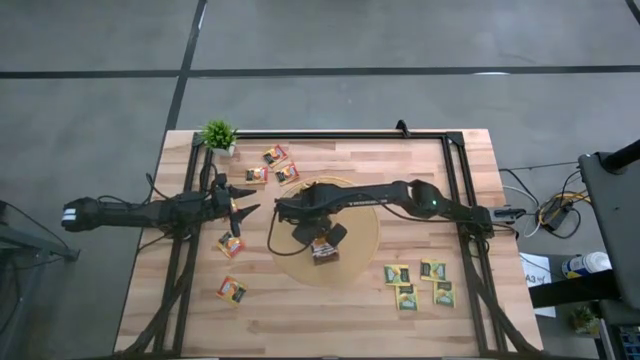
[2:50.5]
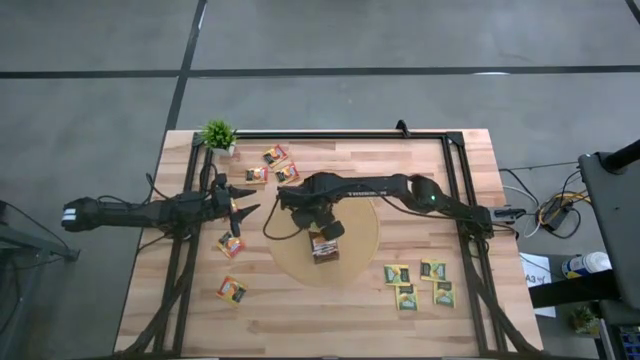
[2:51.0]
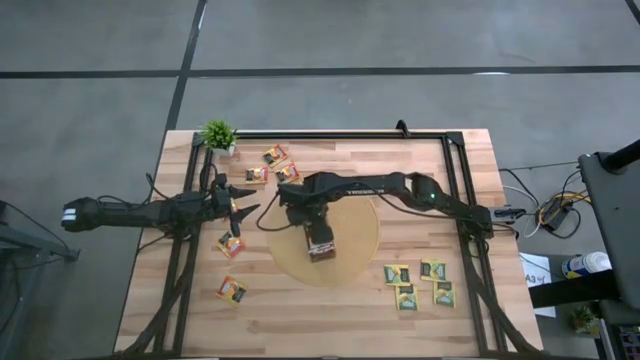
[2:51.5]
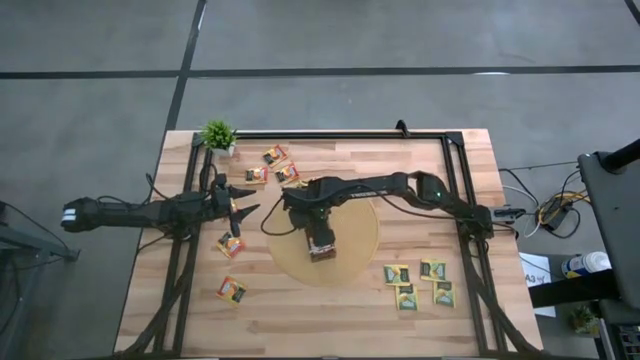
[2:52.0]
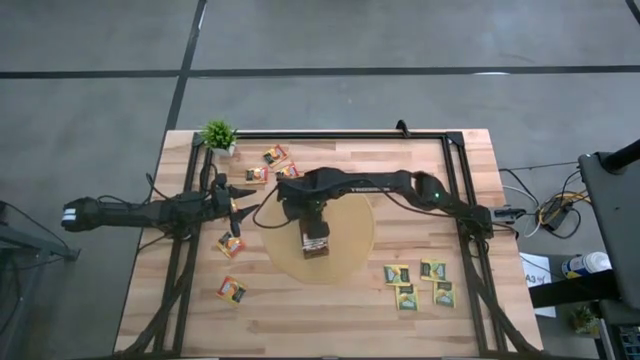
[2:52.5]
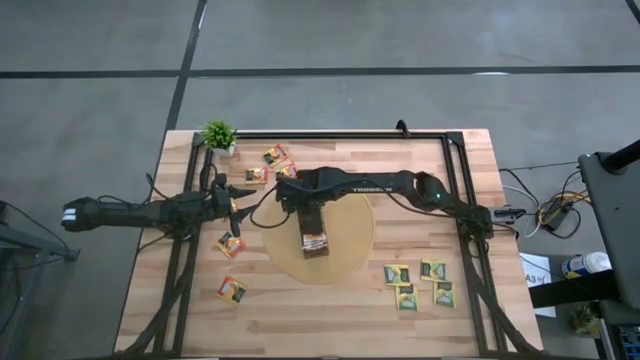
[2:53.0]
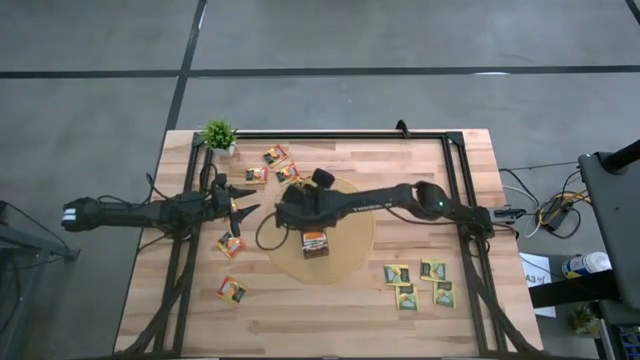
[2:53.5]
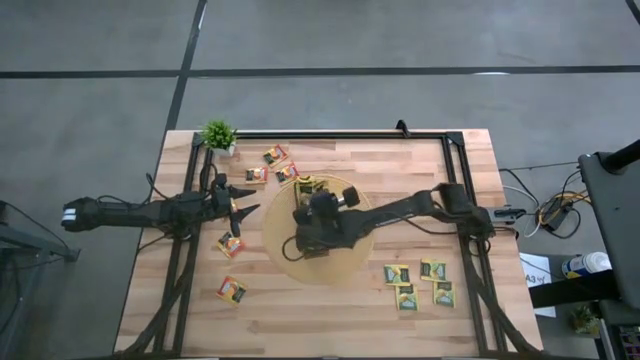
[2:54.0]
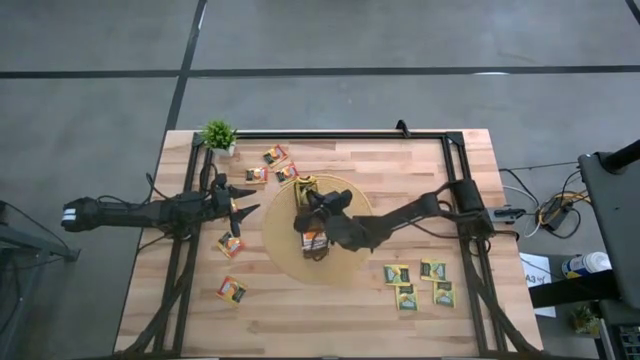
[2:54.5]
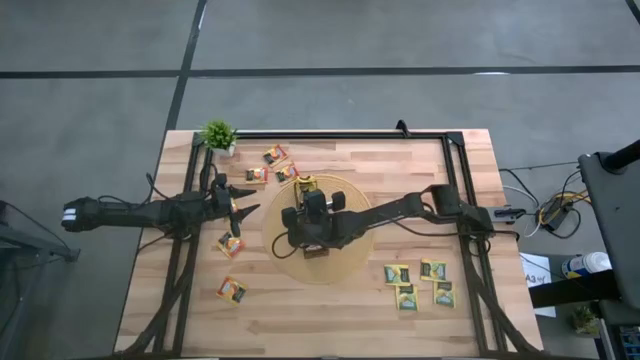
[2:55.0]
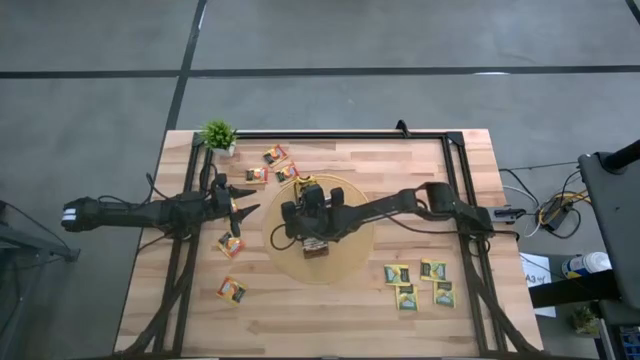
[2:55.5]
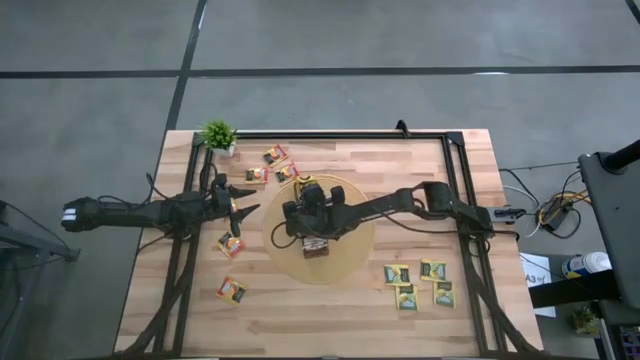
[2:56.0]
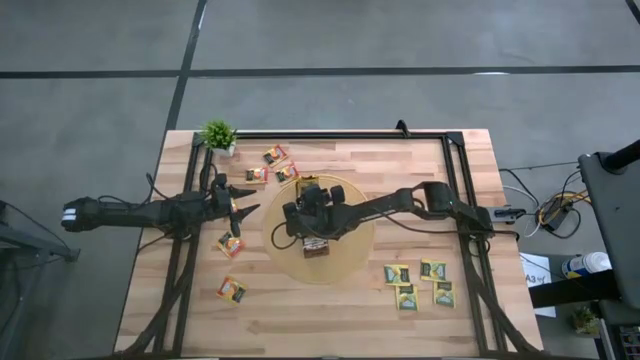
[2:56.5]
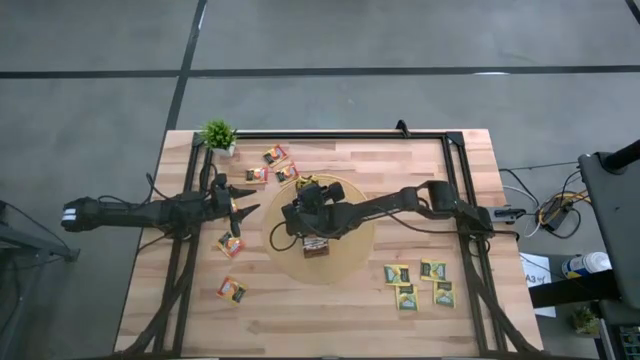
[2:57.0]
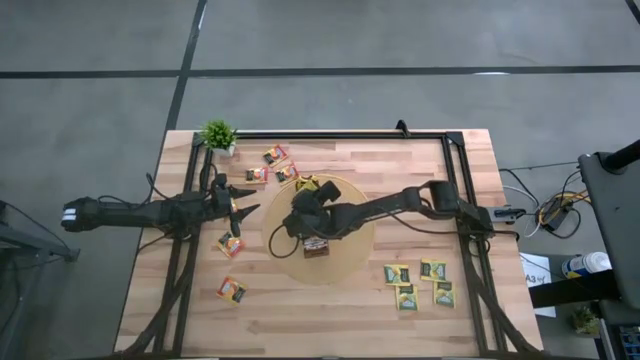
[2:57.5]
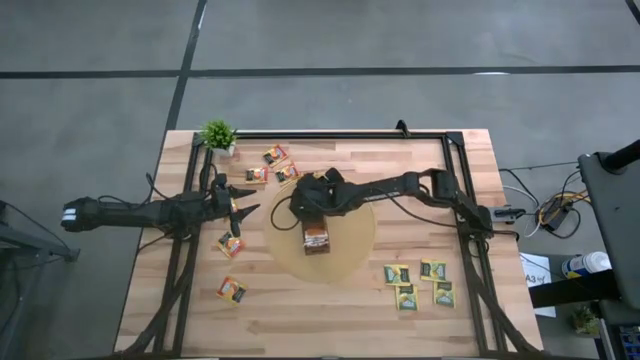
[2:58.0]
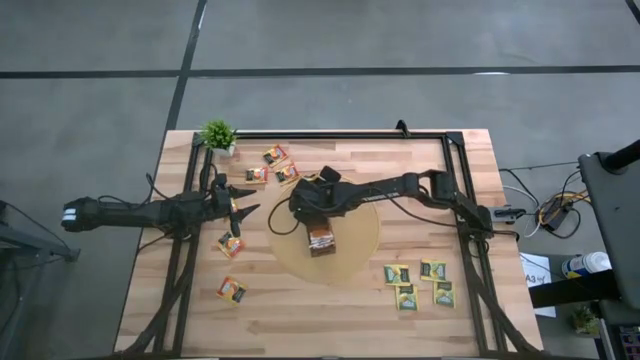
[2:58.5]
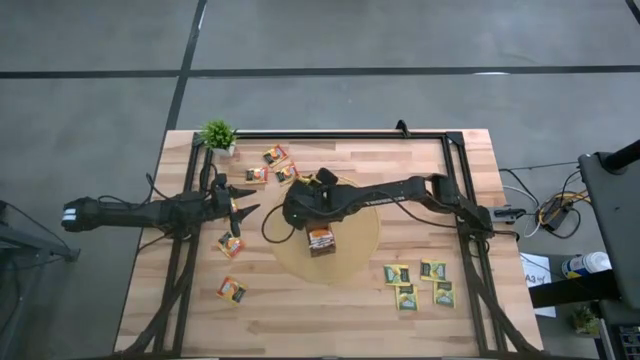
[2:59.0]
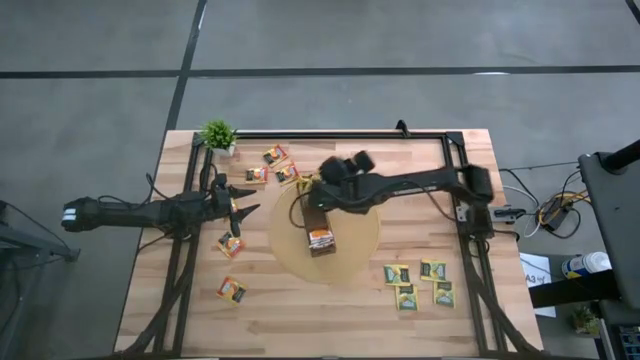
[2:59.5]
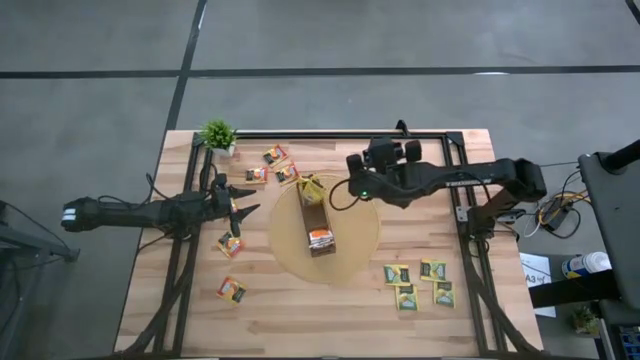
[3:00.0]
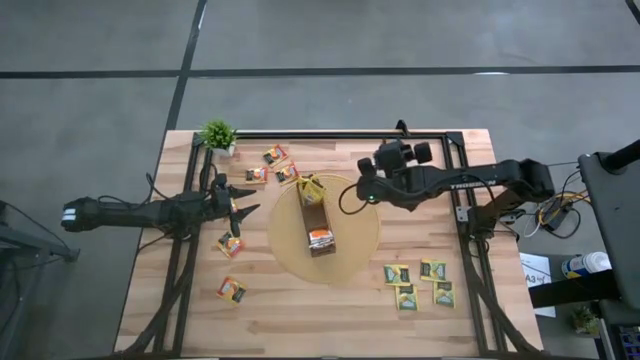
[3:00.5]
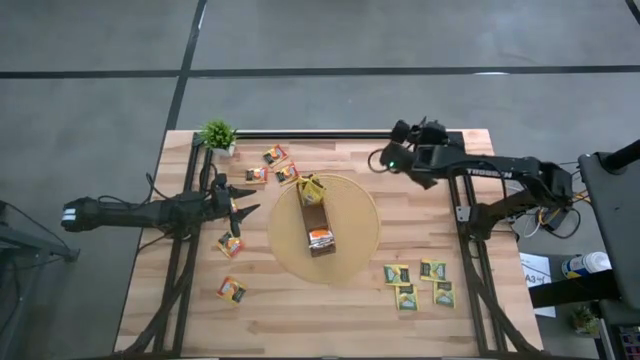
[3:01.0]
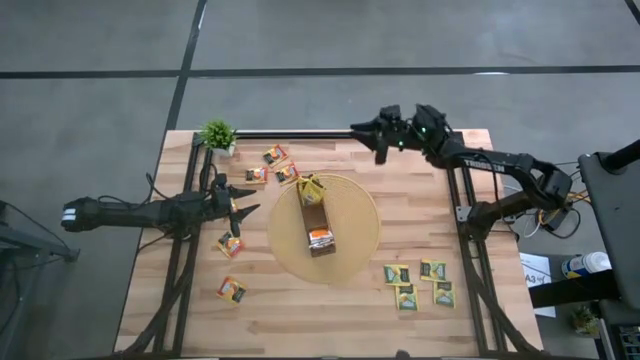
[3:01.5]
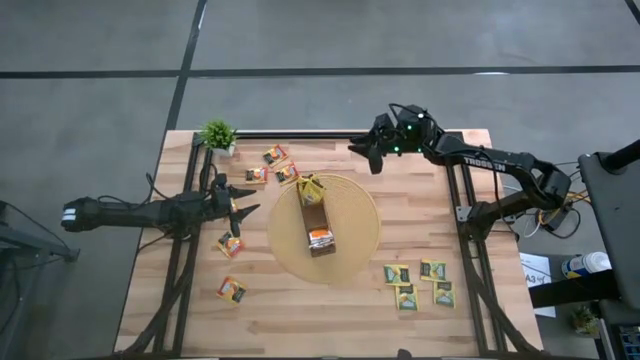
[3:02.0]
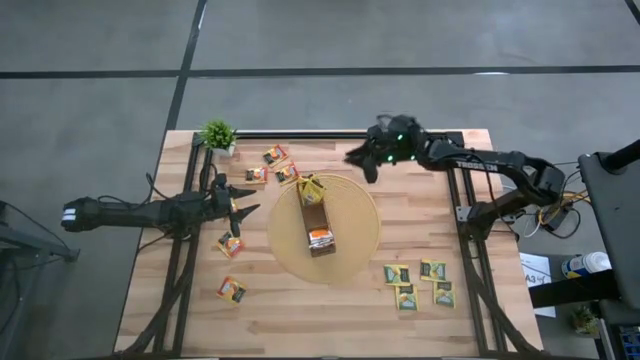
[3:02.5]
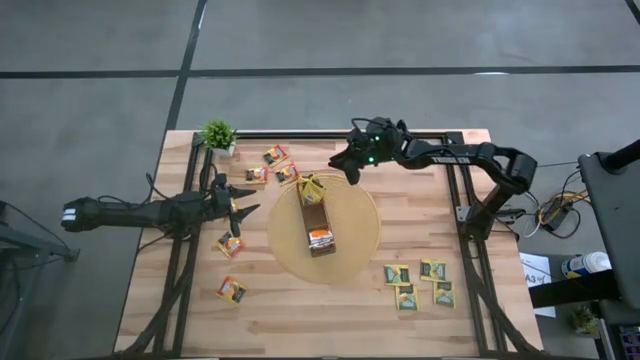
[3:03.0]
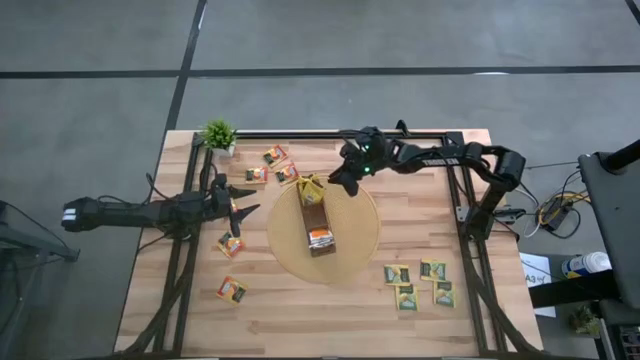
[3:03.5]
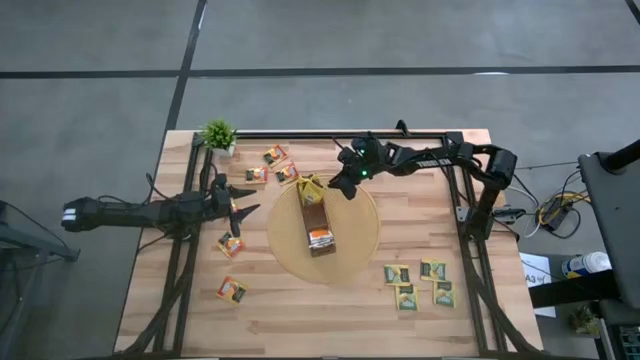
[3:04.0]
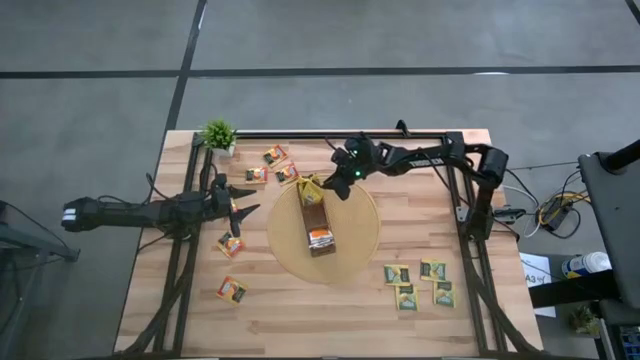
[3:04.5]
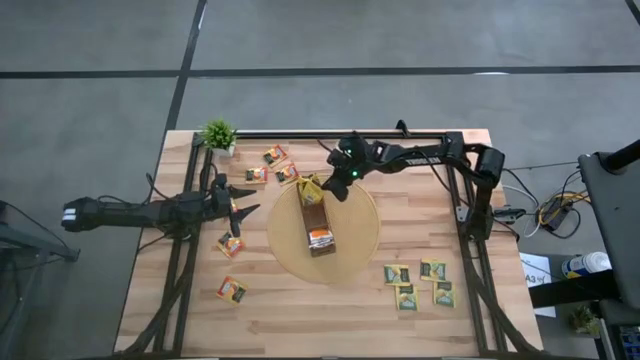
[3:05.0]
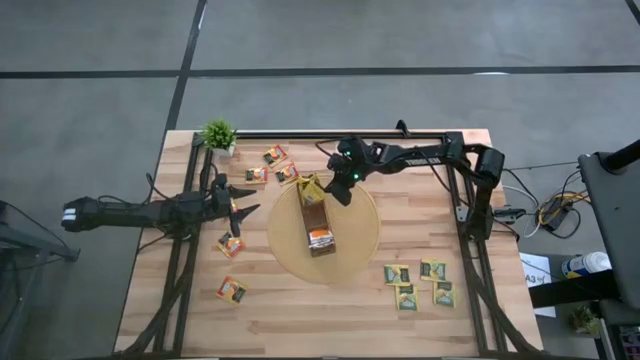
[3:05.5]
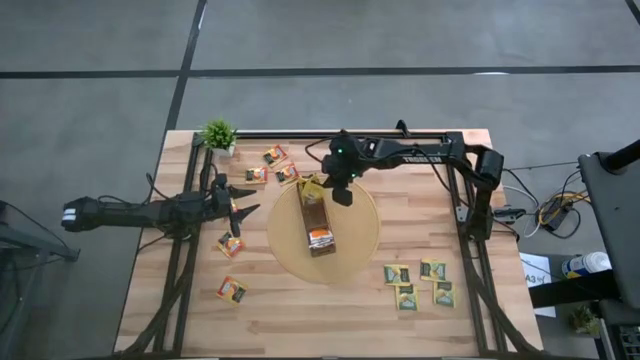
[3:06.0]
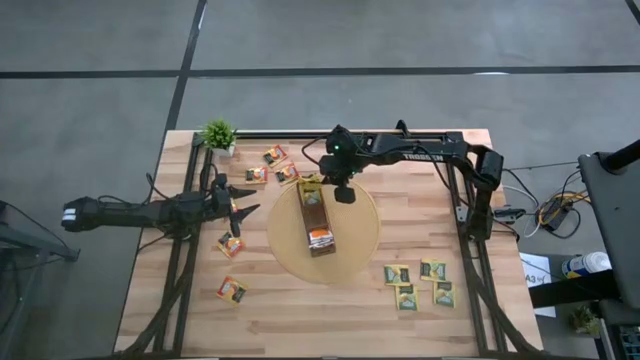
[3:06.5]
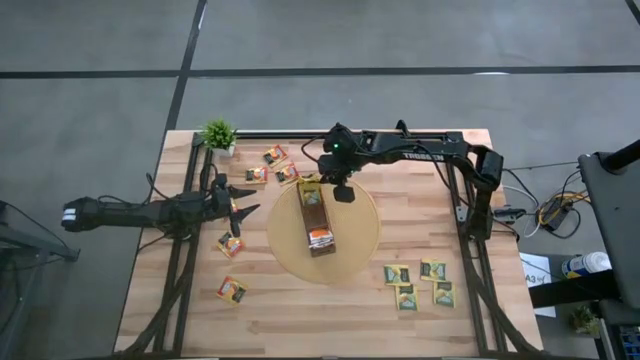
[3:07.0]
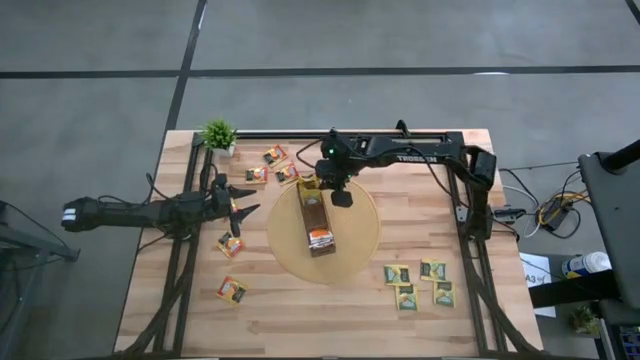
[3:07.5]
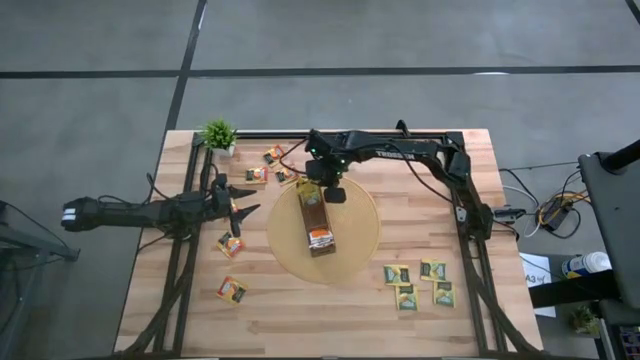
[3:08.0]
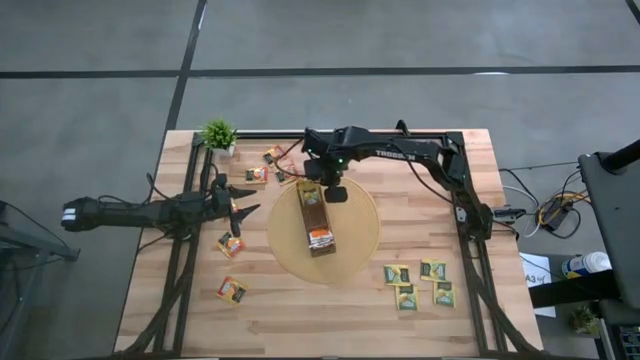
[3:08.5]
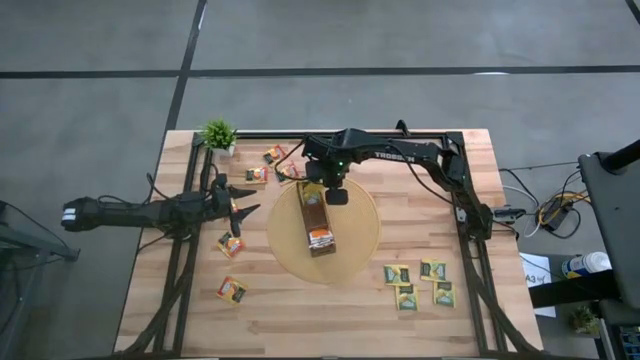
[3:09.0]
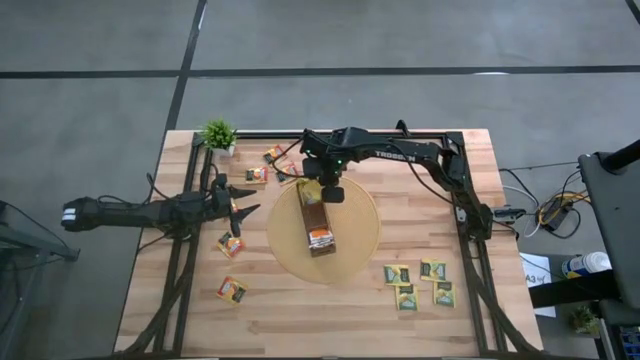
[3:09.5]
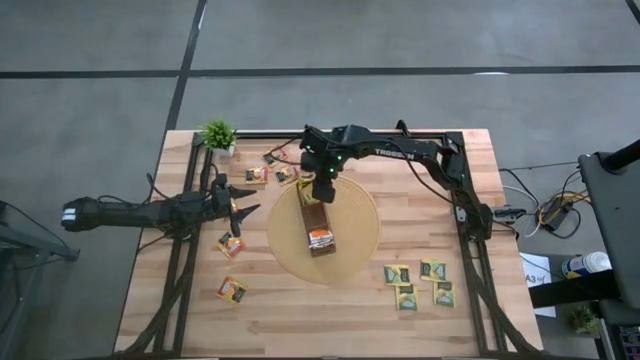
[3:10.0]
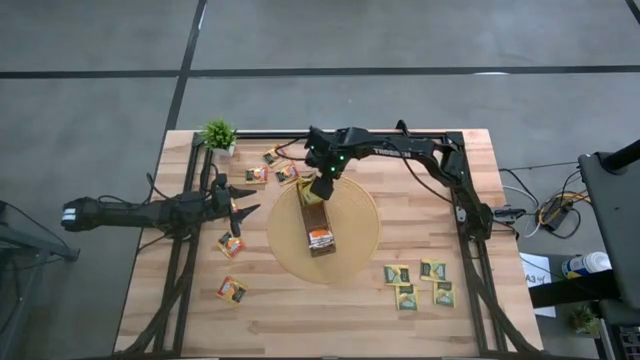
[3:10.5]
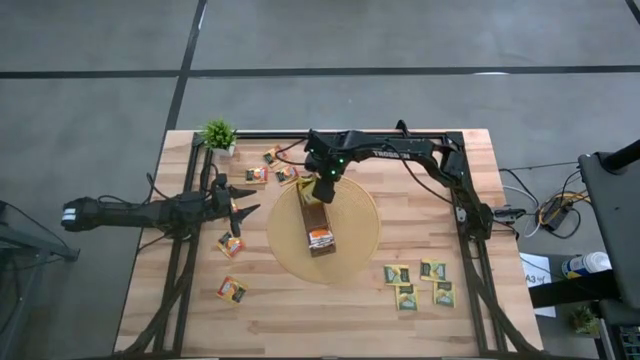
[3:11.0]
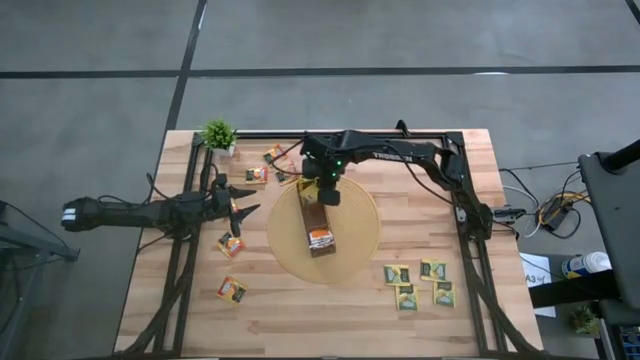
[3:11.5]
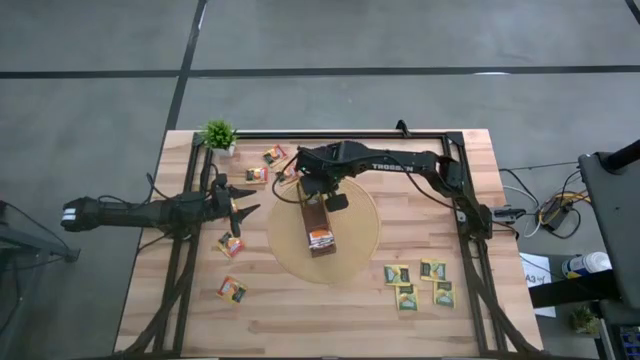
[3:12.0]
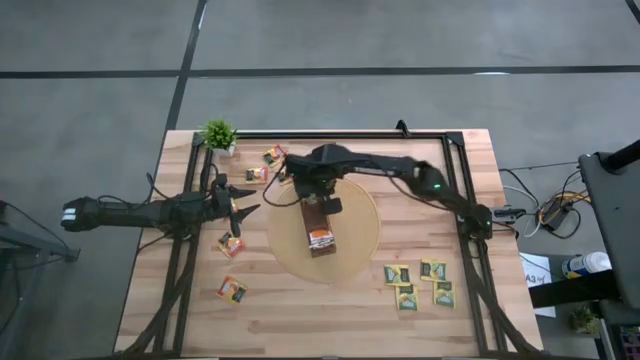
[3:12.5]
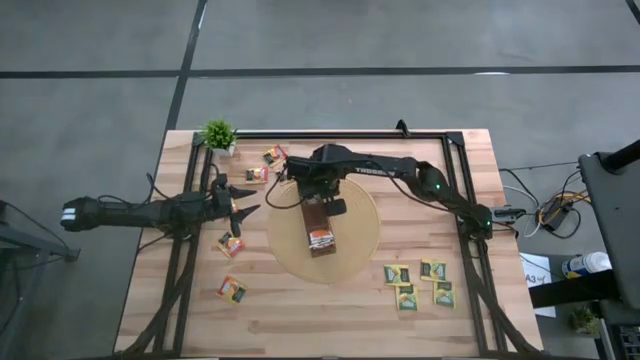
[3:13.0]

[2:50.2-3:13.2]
Task: Pick & Place Tea
Put the yellow tea bag into the top section of the wooden organizer
